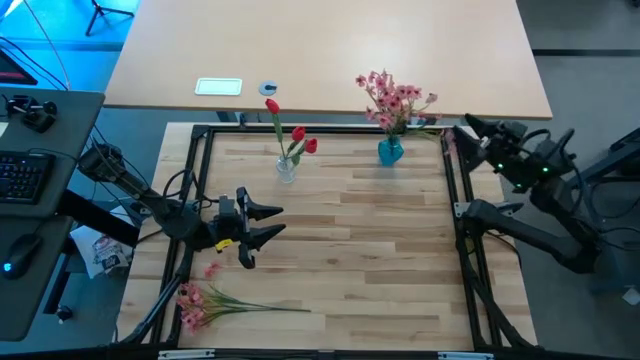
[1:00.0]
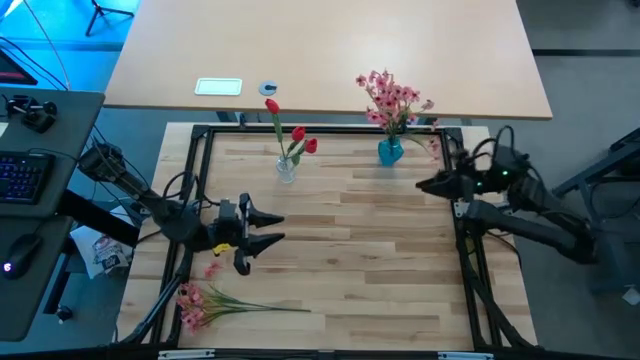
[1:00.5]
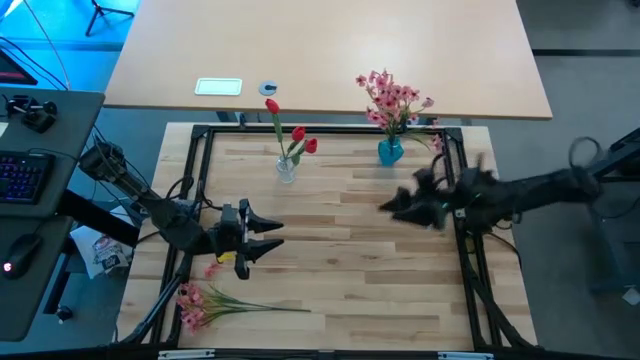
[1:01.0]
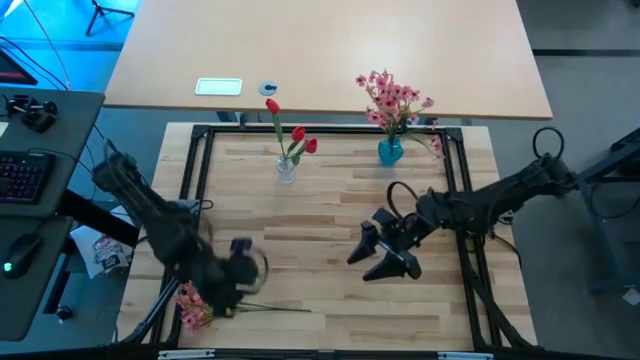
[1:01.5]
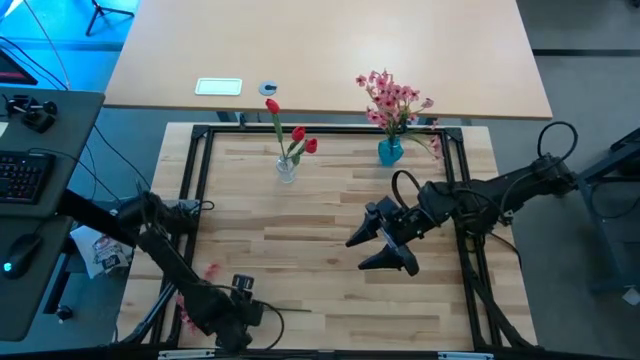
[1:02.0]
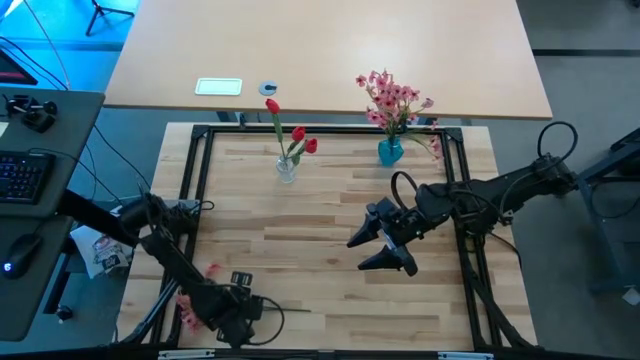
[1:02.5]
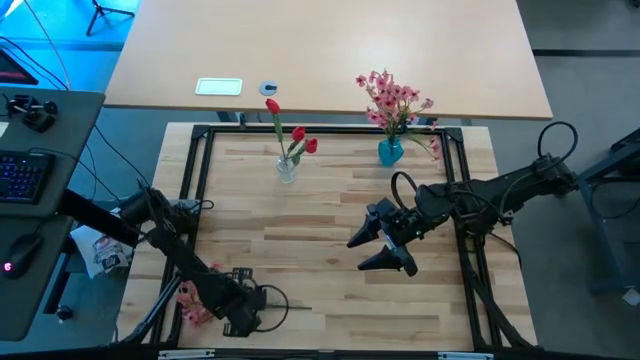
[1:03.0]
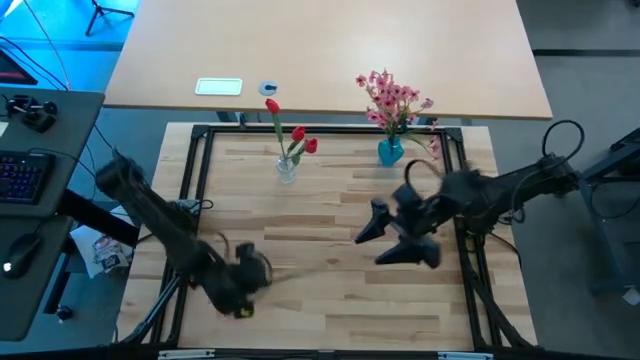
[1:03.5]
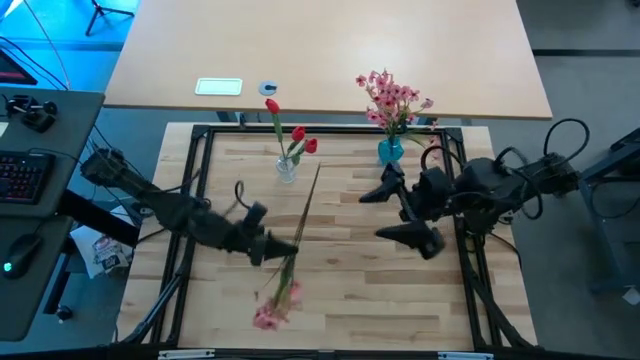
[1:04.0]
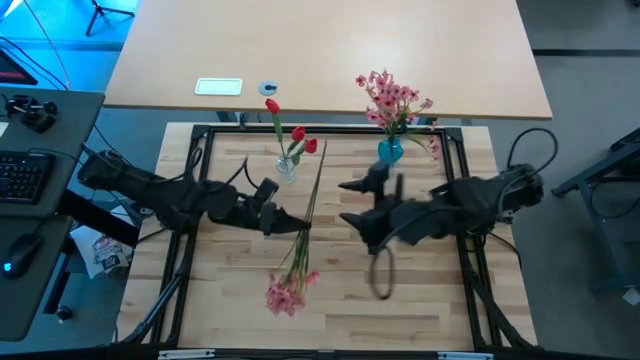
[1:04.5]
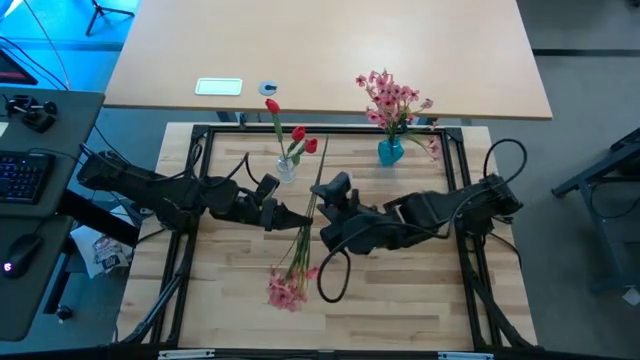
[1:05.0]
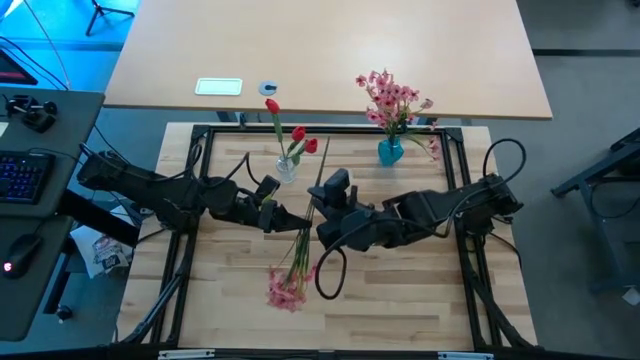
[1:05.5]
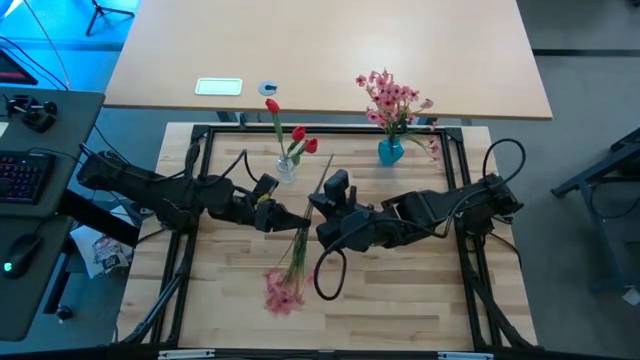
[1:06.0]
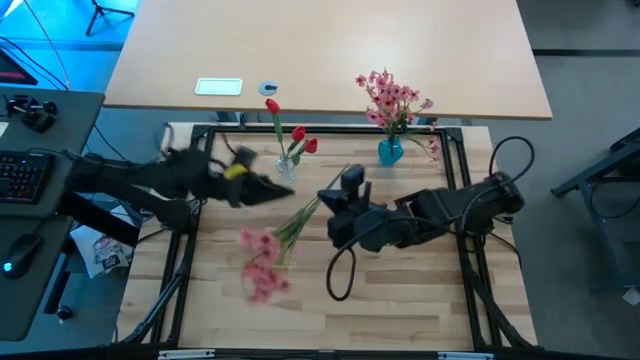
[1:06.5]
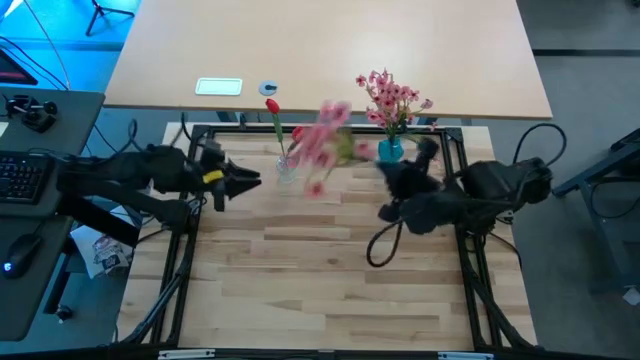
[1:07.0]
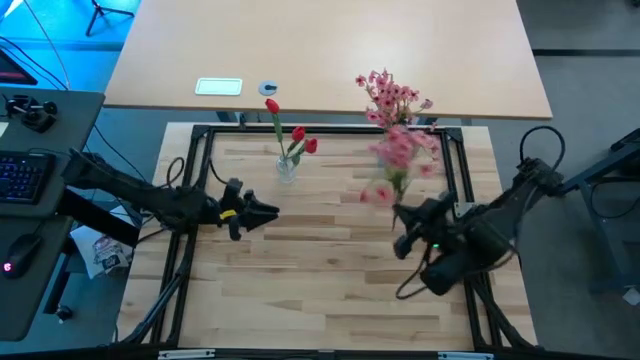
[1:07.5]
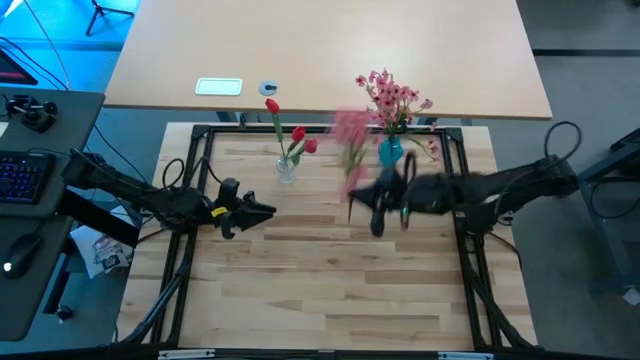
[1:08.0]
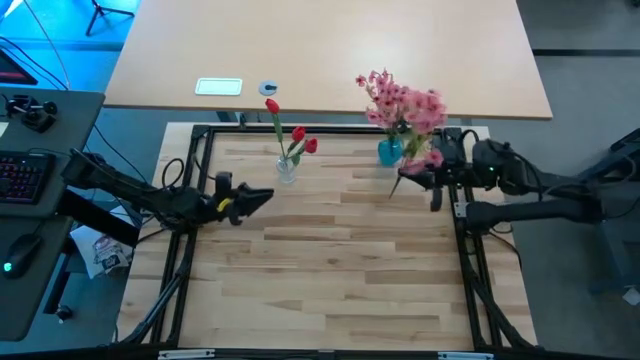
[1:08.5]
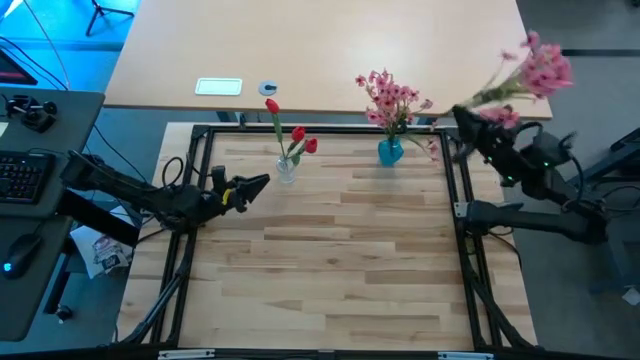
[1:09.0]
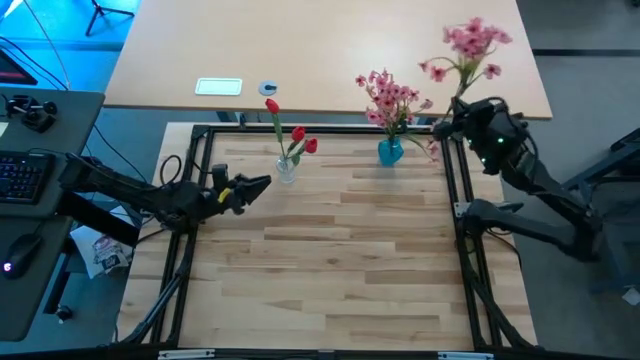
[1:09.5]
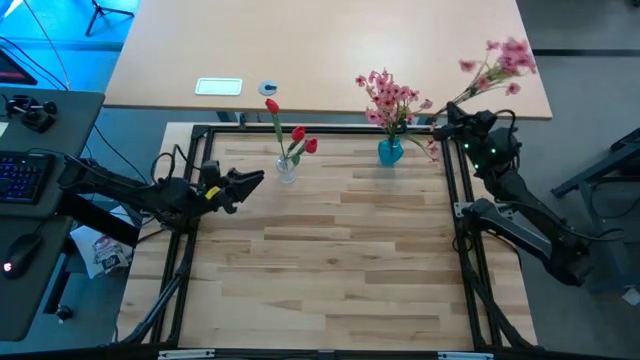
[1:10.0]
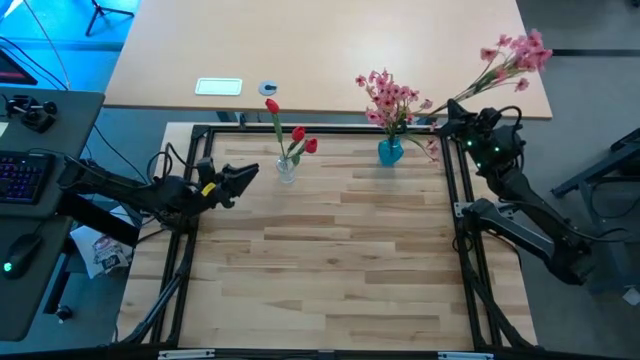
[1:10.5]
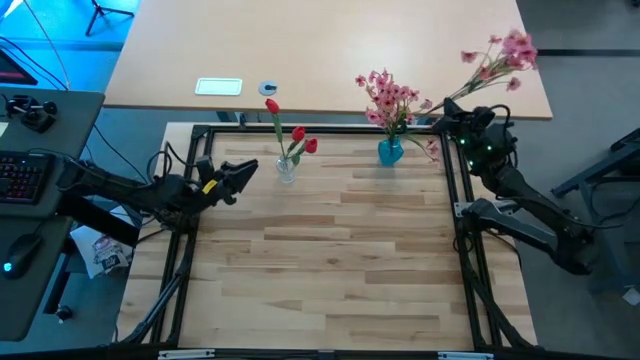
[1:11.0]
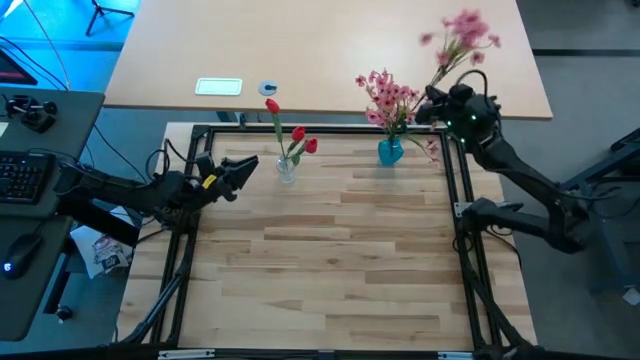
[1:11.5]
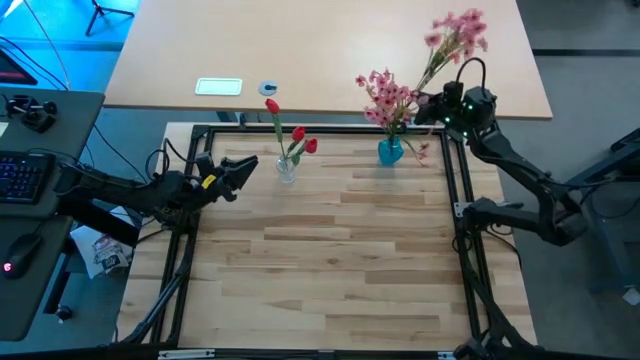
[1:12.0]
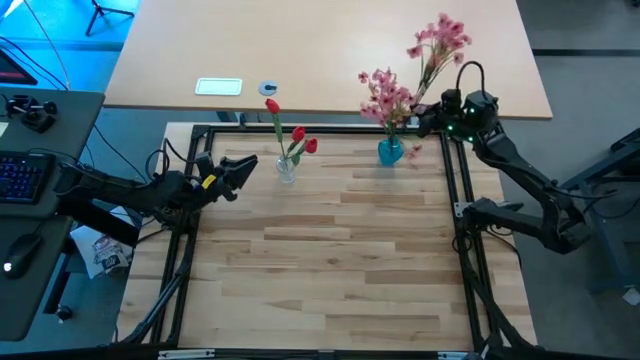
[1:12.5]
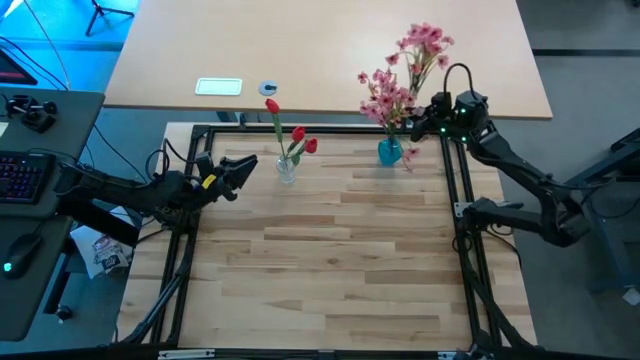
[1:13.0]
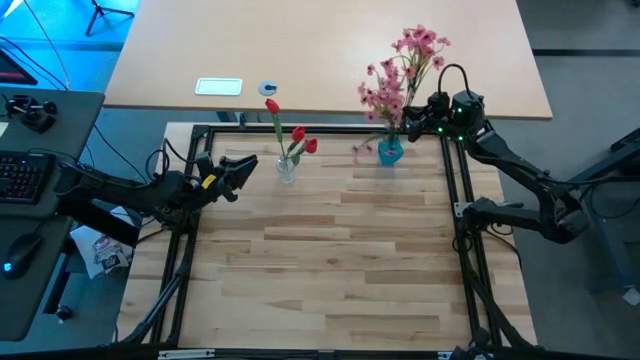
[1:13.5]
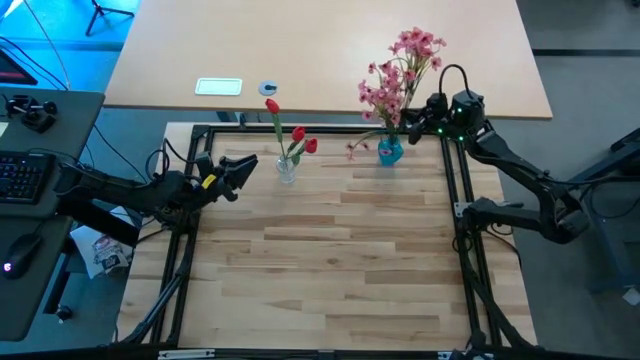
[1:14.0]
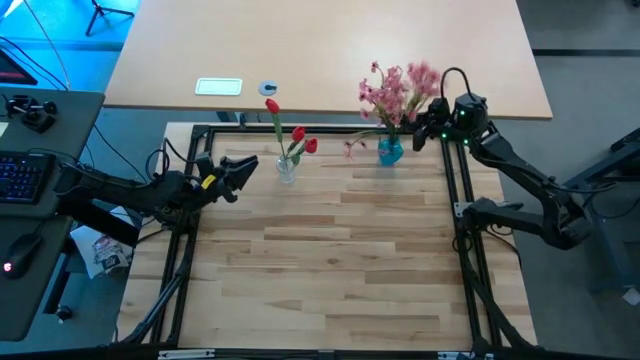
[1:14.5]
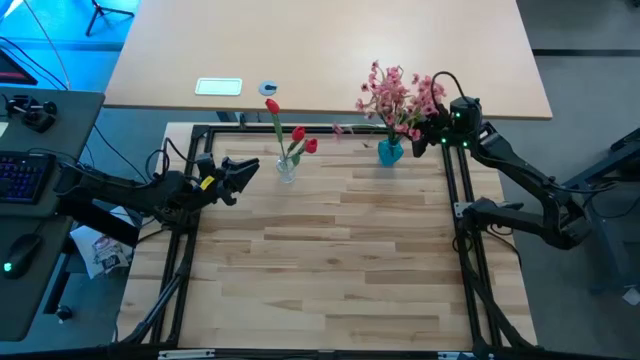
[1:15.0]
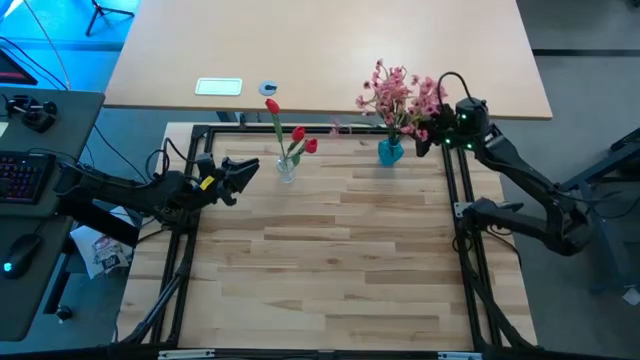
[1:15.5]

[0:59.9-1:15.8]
Task: Sort flowers into vase by color
Put the pink flowers into the blue vase

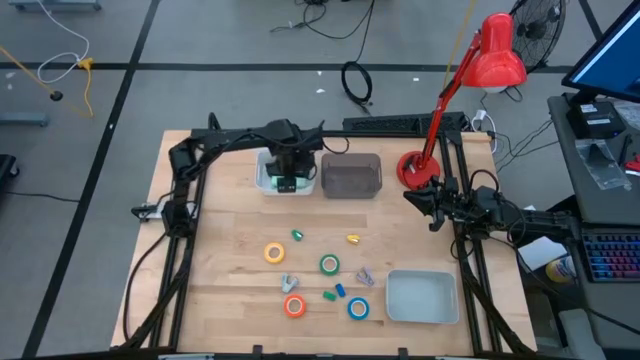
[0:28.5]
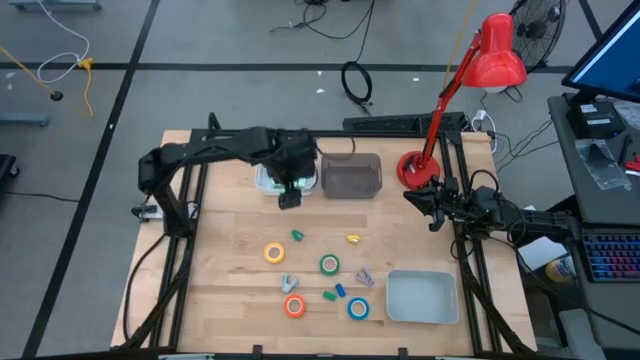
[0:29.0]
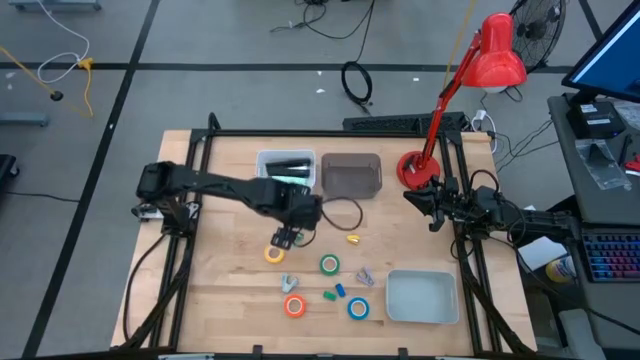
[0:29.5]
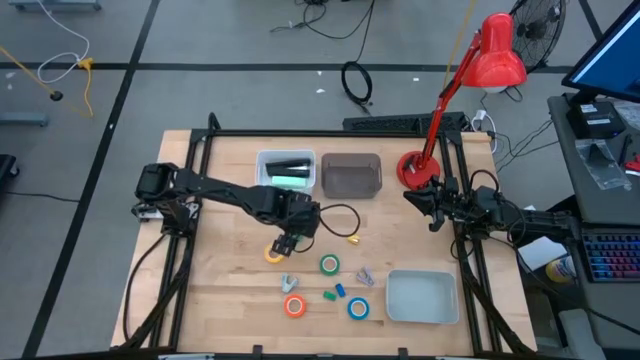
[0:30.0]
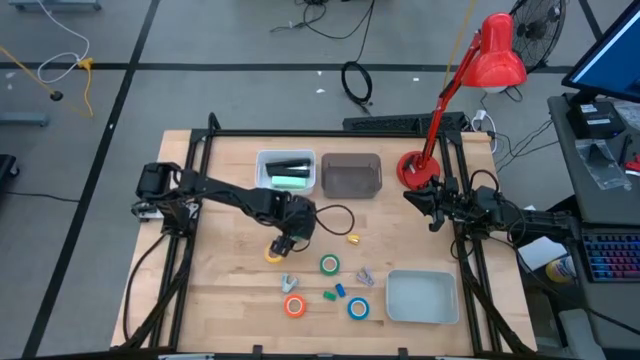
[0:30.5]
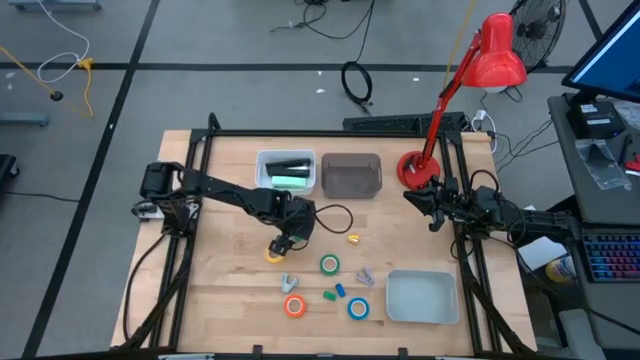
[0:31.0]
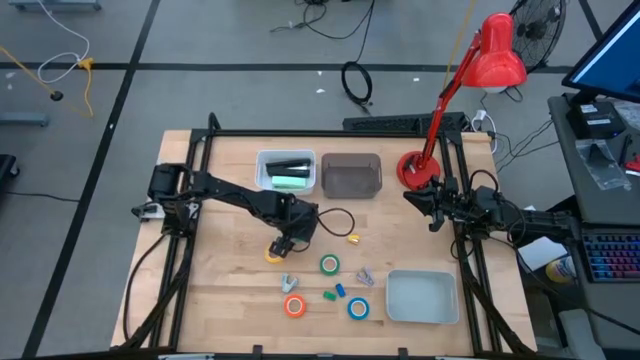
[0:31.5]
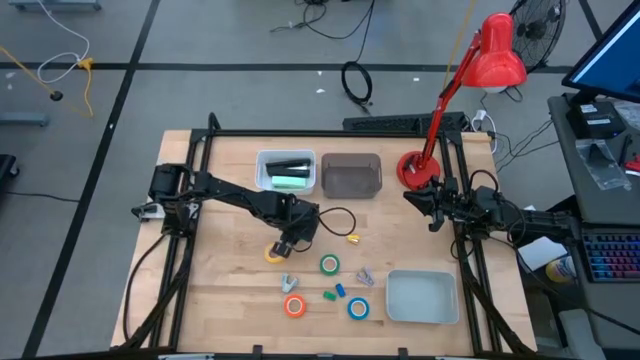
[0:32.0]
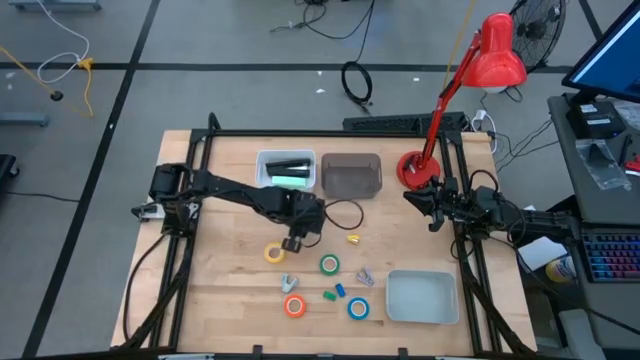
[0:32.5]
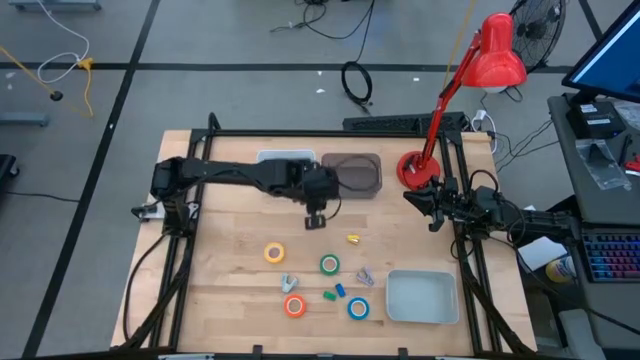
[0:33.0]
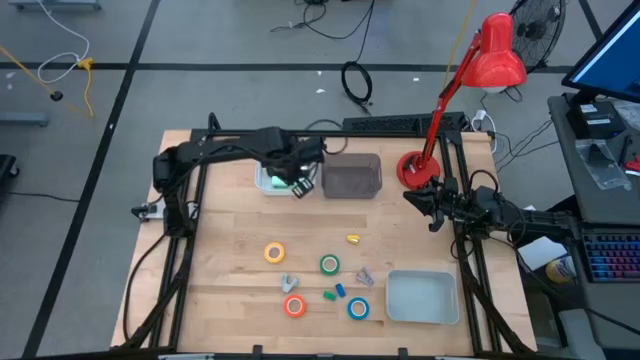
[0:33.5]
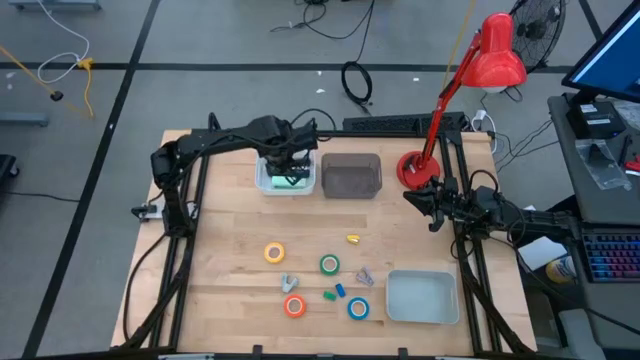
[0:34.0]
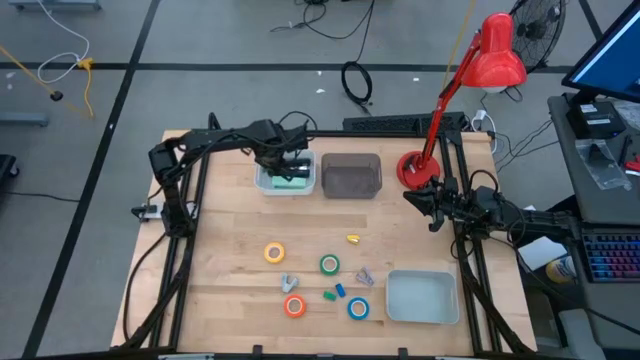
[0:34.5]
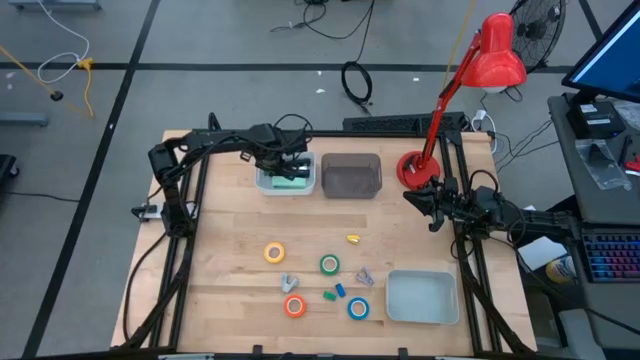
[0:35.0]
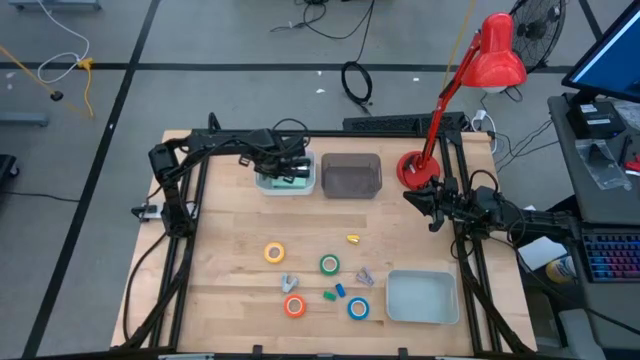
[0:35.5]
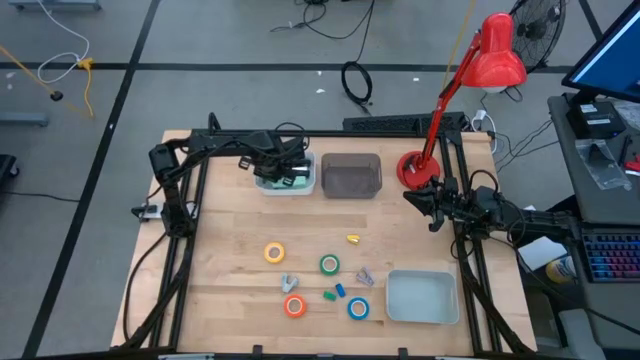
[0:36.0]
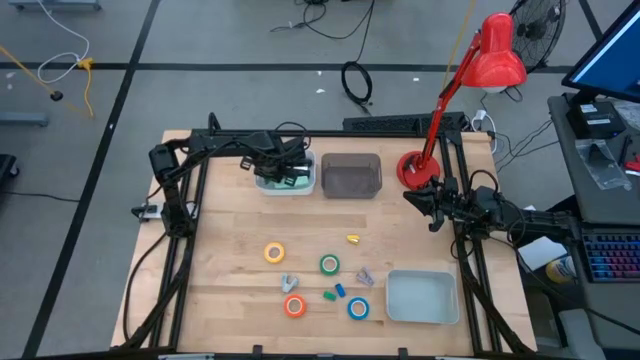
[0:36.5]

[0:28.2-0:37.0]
Task: Pick and place Stapler, Stapler remover, tape
Put the top small green stapler into the white bin
